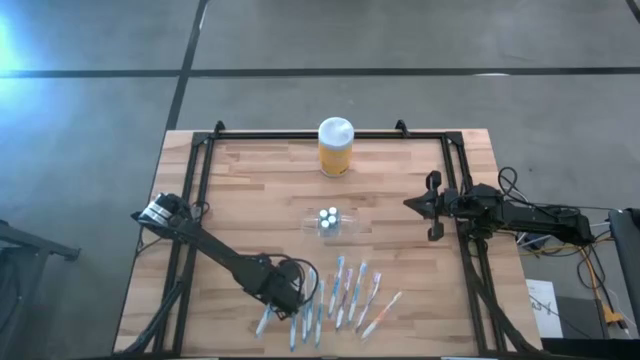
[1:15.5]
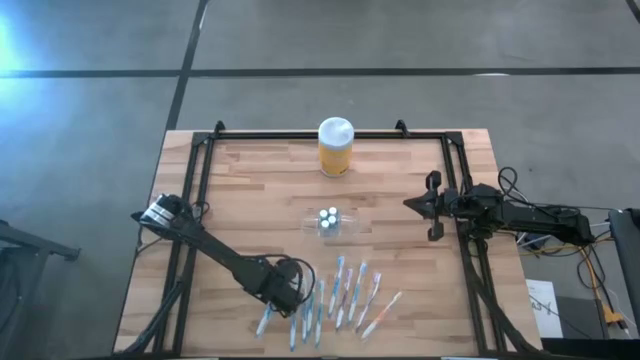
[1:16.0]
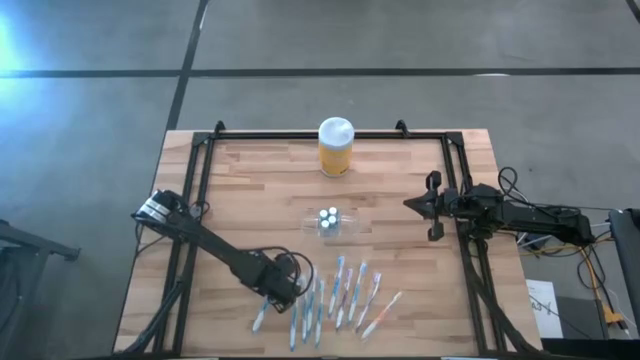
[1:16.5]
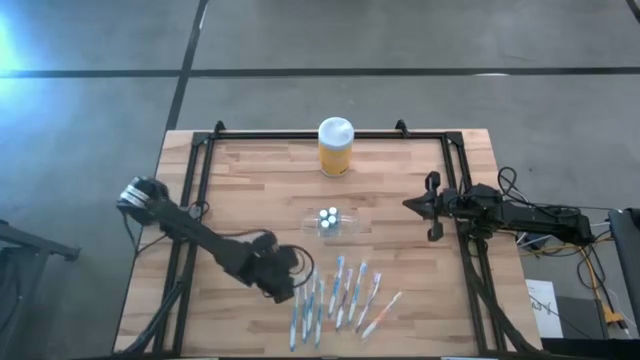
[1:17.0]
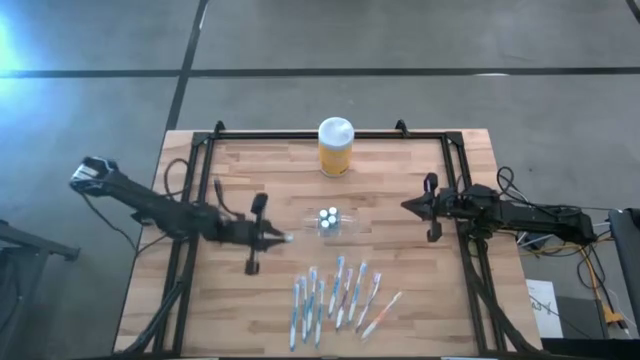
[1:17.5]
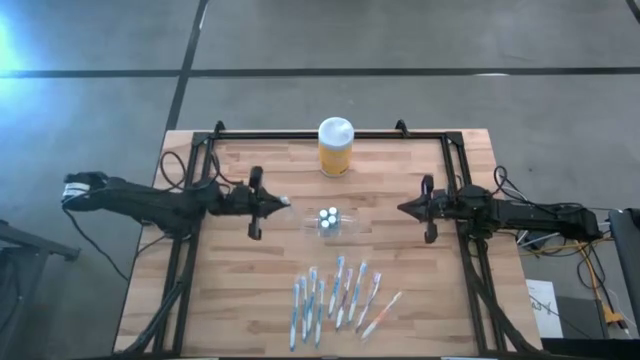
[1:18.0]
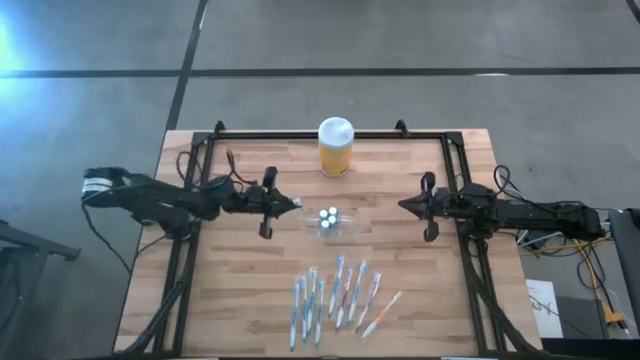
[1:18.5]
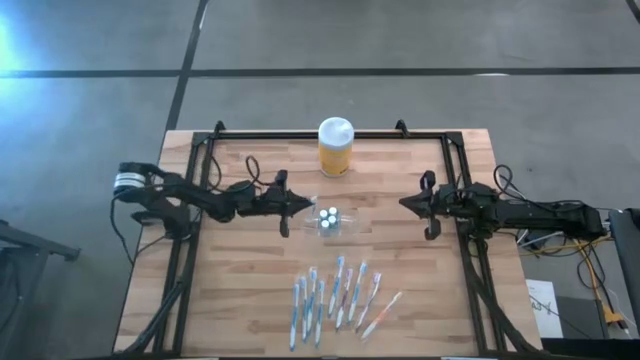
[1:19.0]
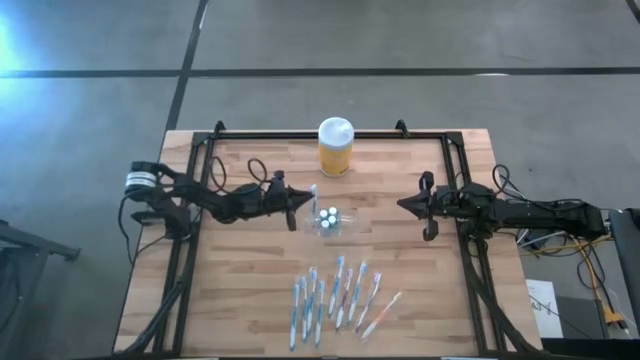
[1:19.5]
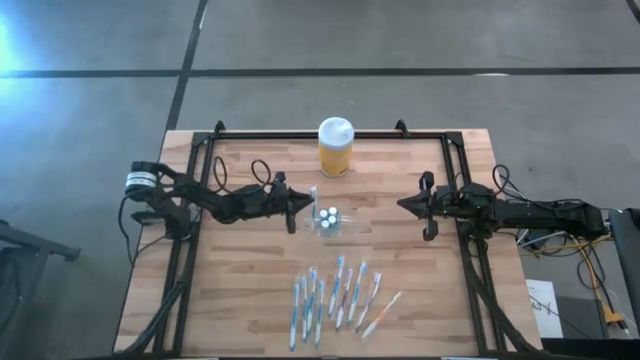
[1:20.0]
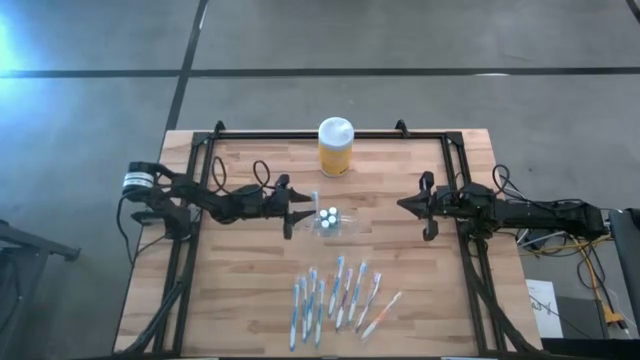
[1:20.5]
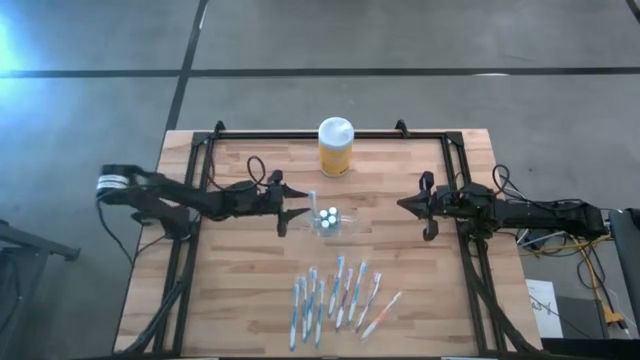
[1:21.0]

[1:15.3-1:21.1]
Task: Pick & Place toothbrushing station
Put the blue toothbrush into the transparent organizer

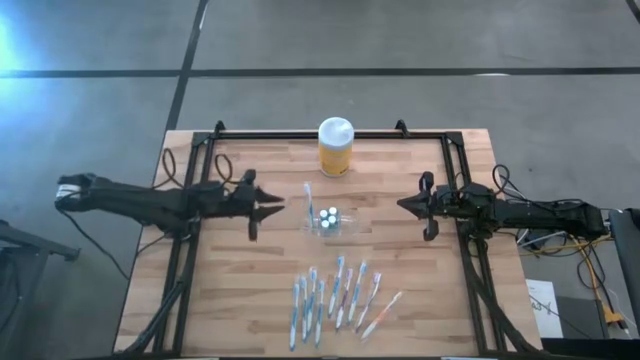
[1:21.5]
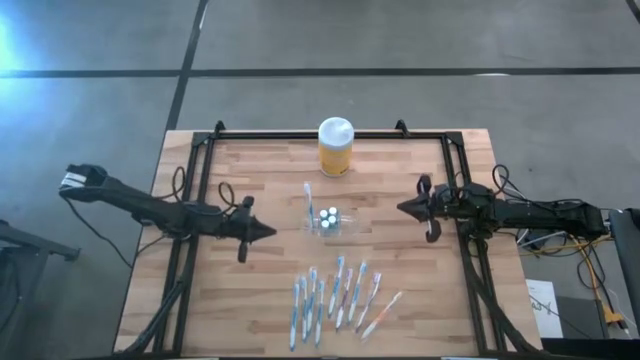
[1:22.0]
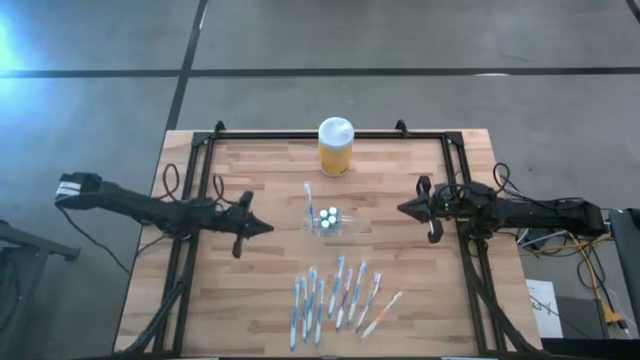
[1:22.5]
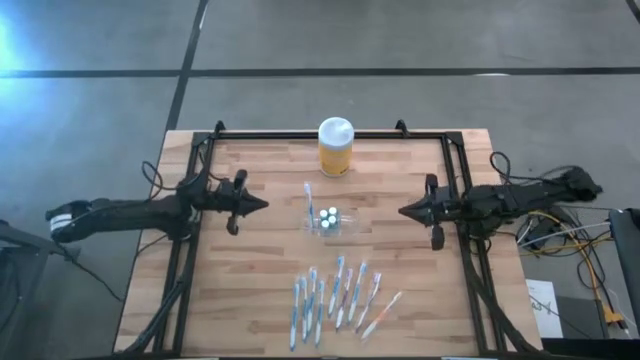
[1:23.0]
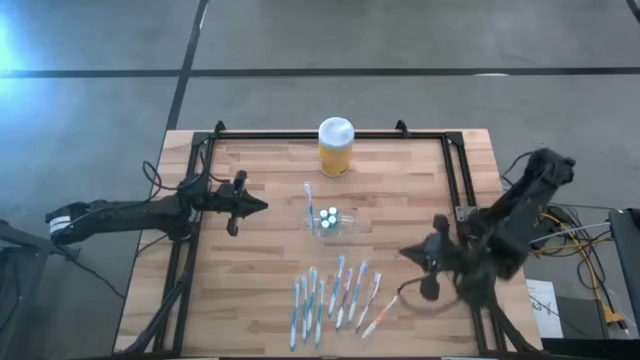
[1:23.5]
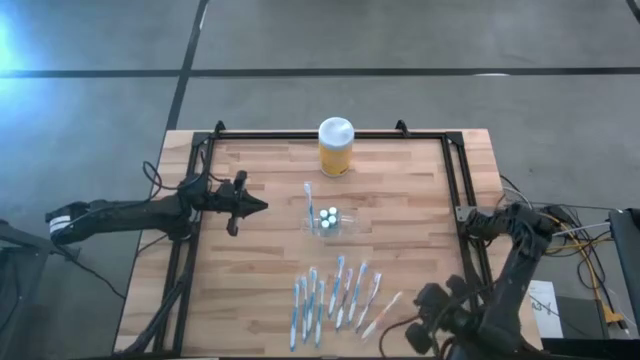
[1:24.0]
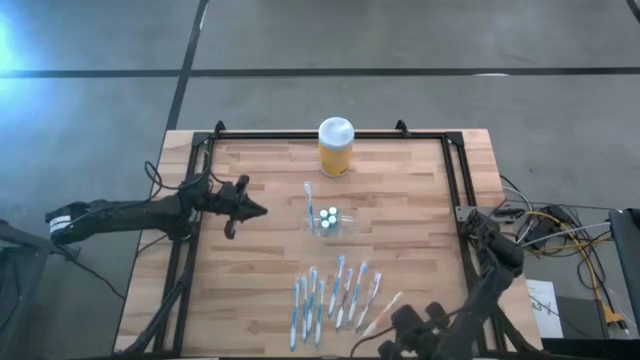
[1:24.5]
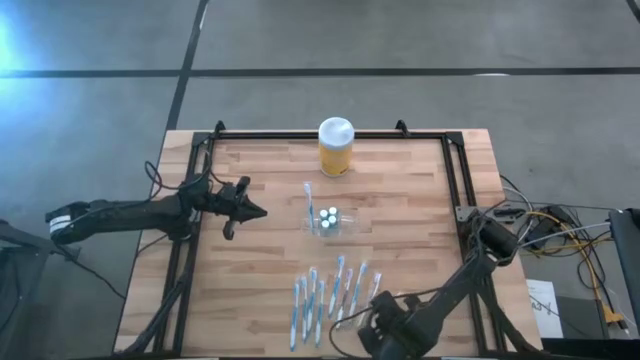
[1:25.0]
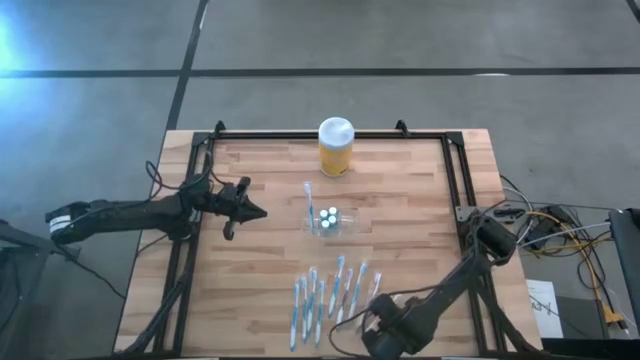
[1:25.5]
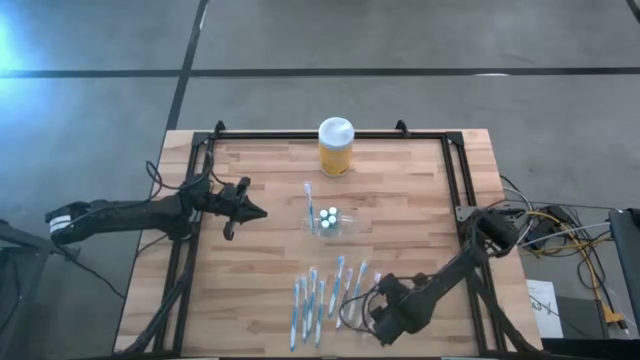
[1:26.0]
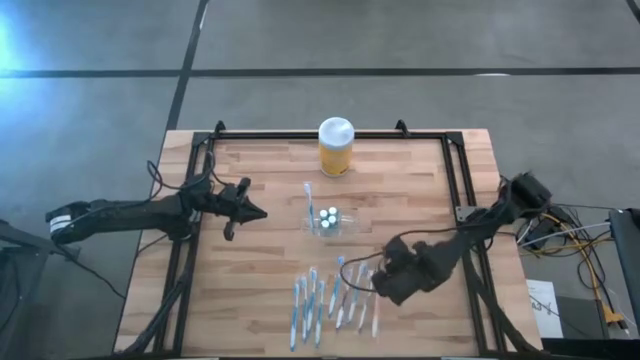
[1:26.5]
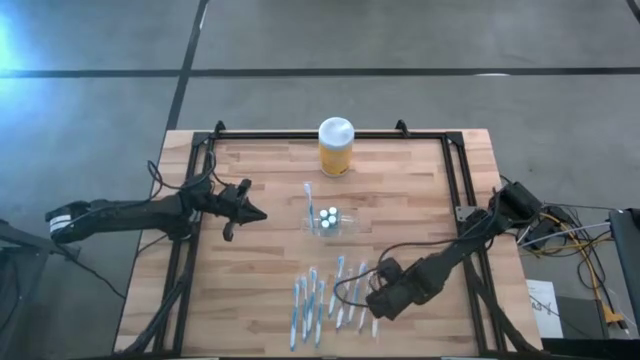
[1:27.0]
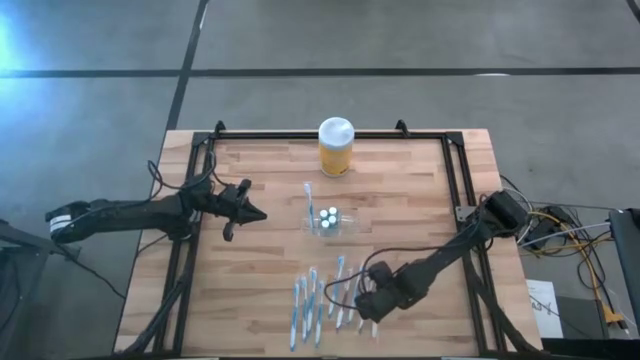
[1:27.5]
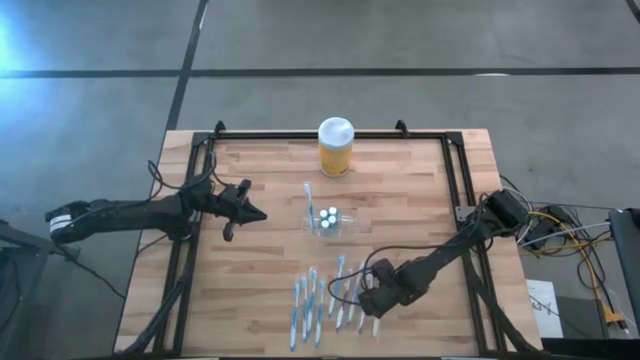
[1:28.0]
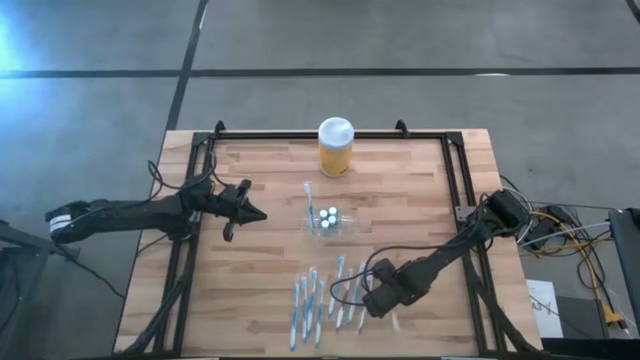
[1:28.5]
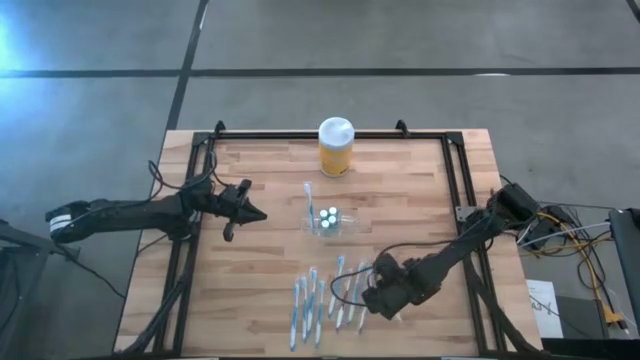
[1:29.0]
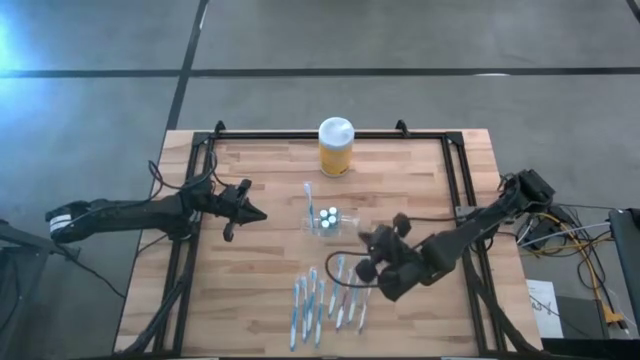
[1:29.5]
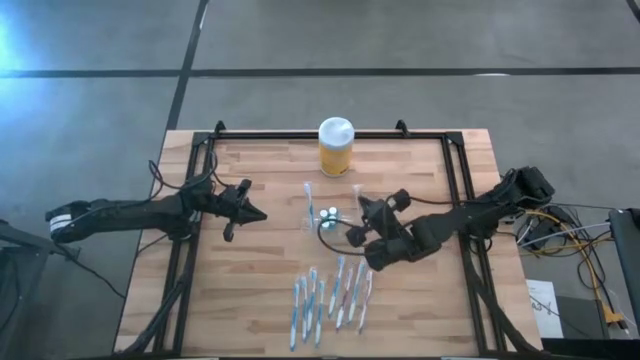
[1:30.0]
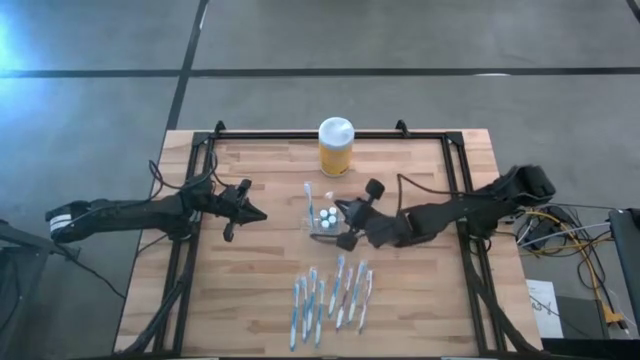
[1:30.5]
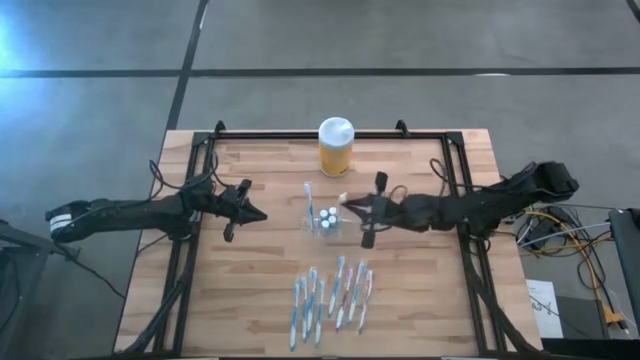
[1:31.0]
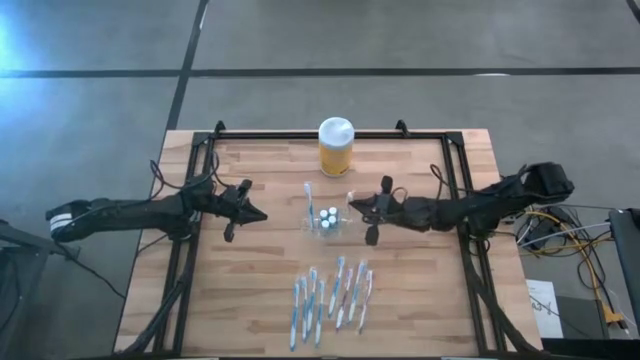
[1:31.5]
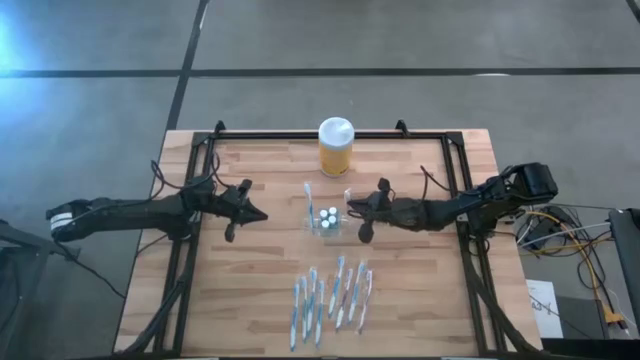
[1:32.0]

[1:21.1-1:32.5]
Put the orange toothbrush into the transparent organizer

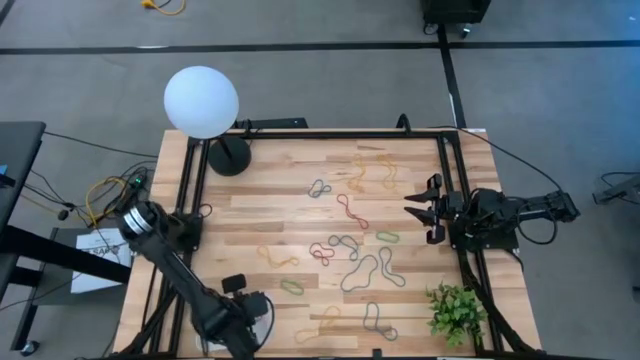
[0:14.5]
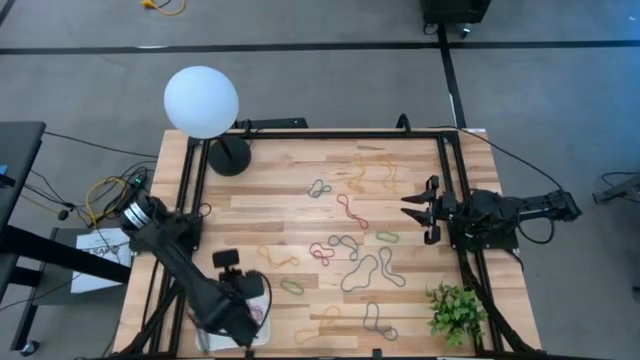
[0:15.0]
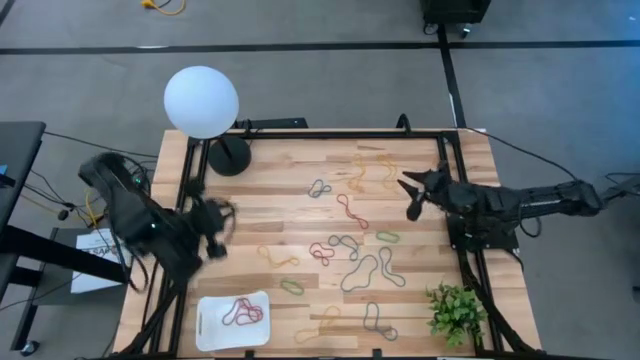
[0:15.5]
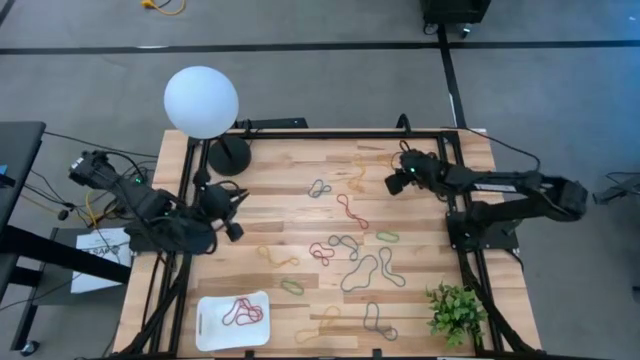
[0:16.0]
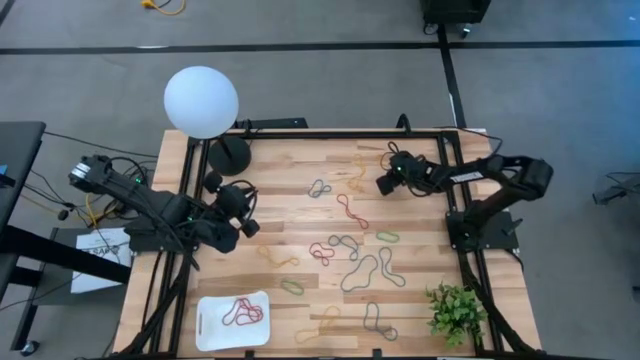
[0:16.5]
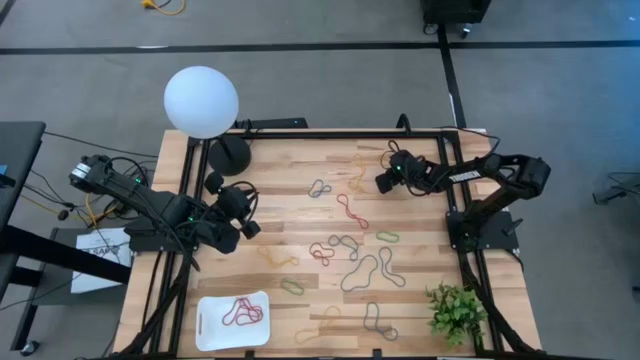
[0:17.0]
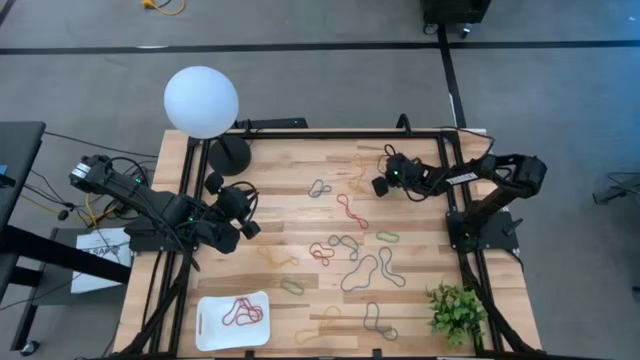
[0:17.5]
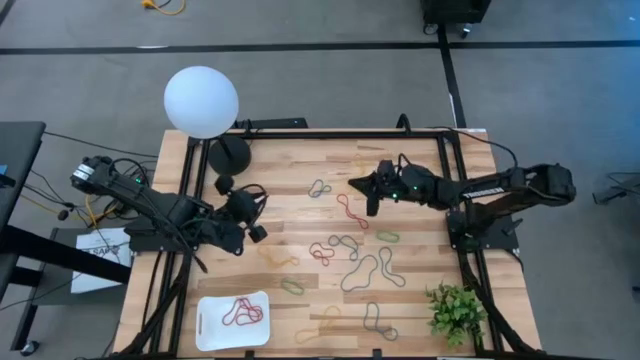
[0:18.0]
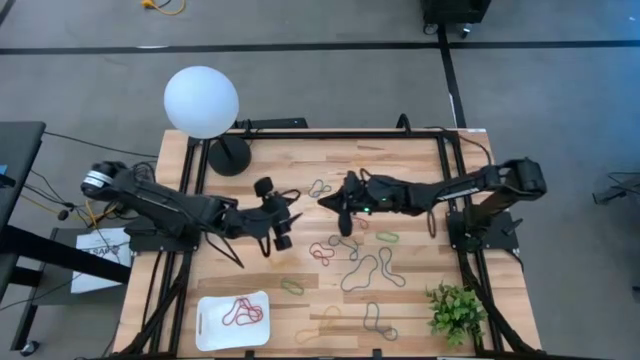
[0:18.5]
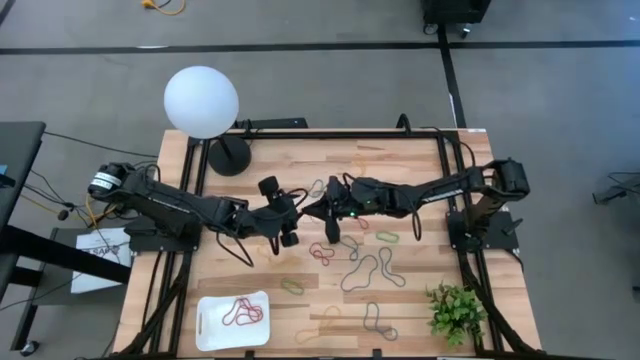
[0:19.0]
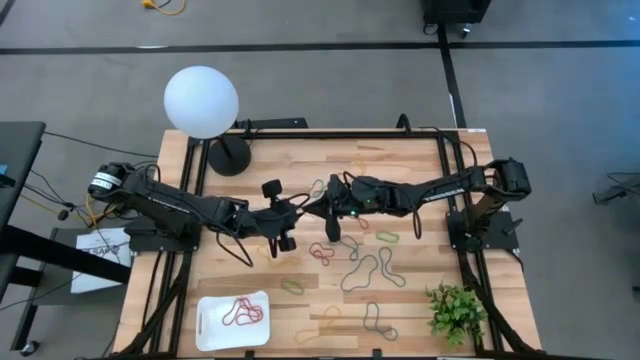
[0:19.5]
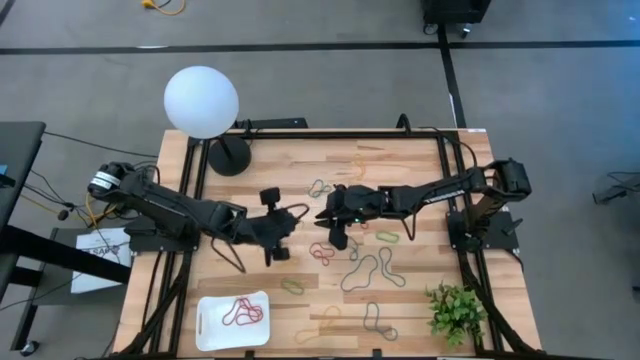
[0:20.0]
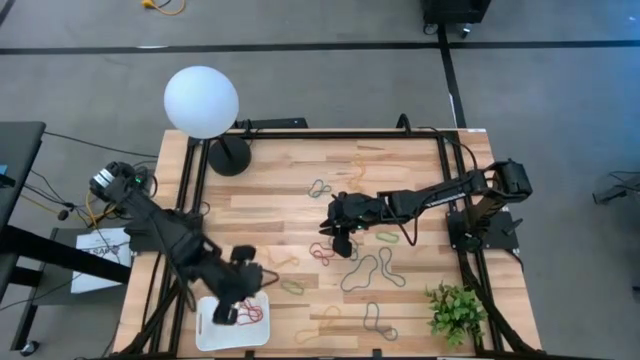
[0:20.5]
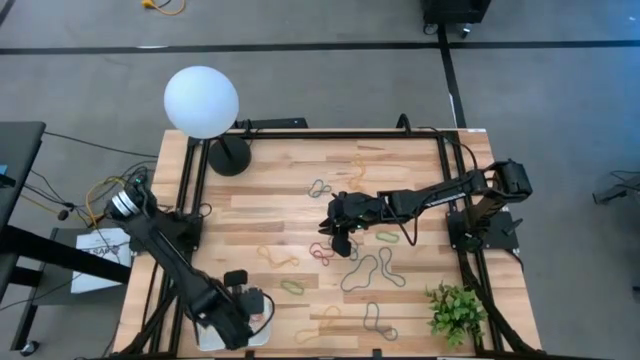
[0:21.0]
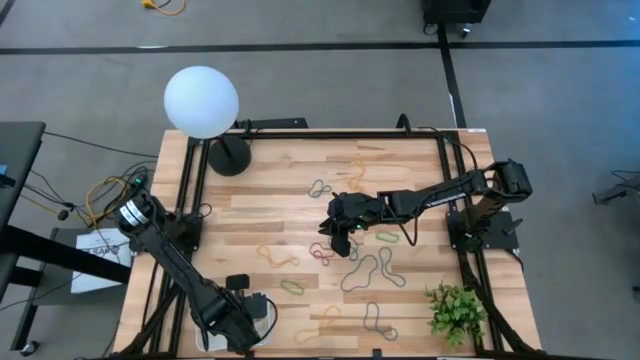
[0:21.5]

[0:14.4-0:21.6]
Task: Pick and place items into bin
Put the yellow rubber band into the bin
